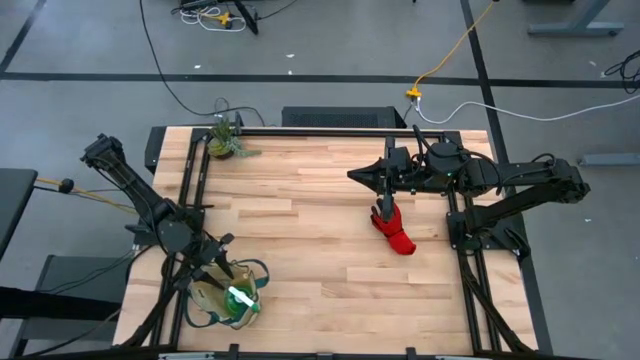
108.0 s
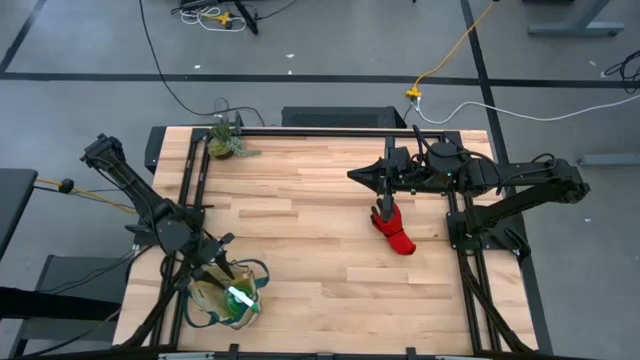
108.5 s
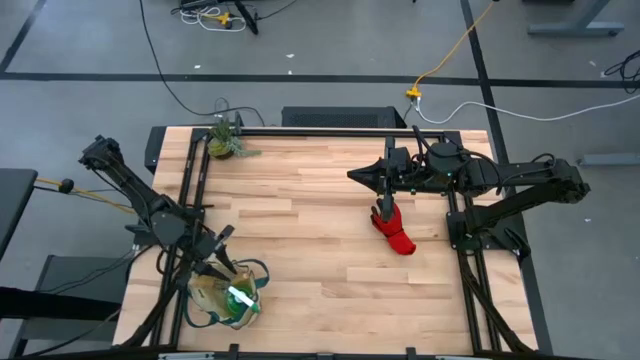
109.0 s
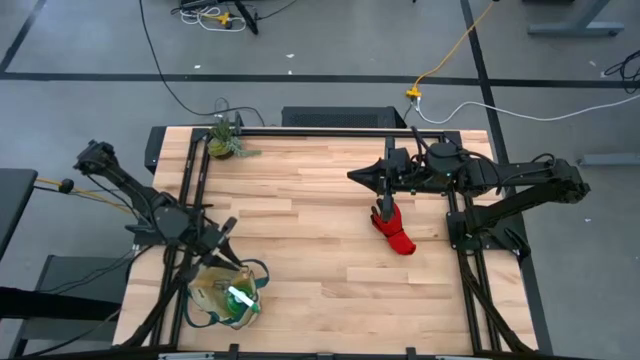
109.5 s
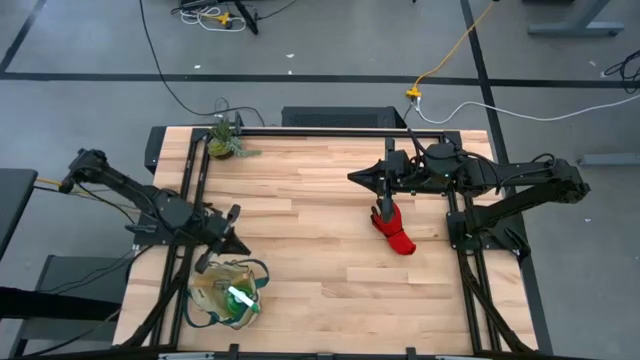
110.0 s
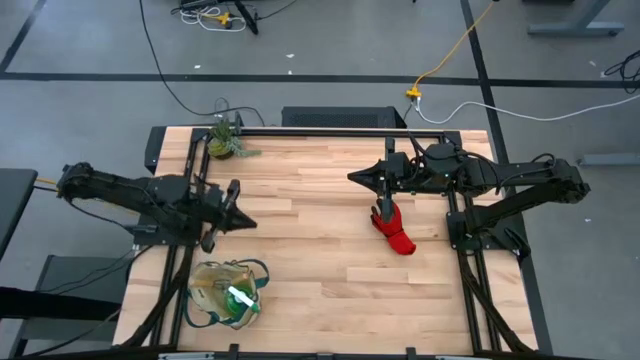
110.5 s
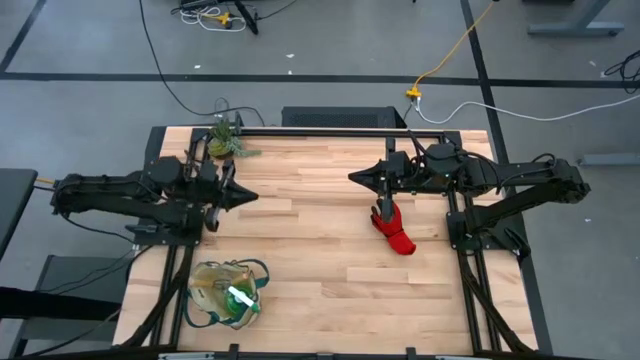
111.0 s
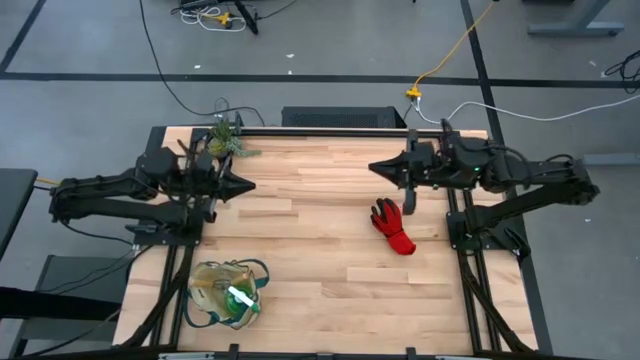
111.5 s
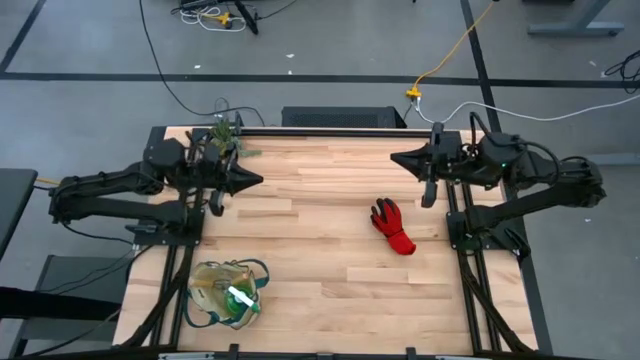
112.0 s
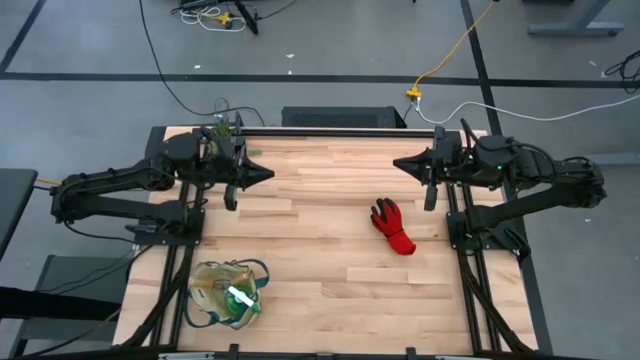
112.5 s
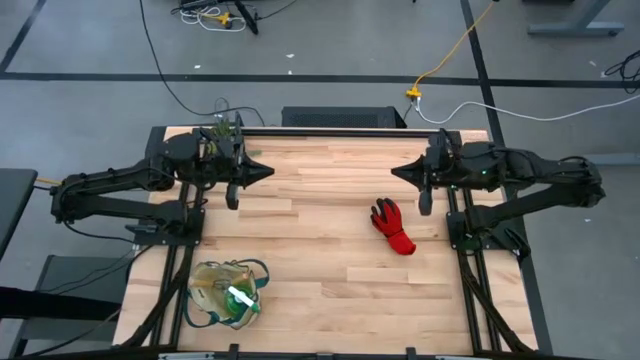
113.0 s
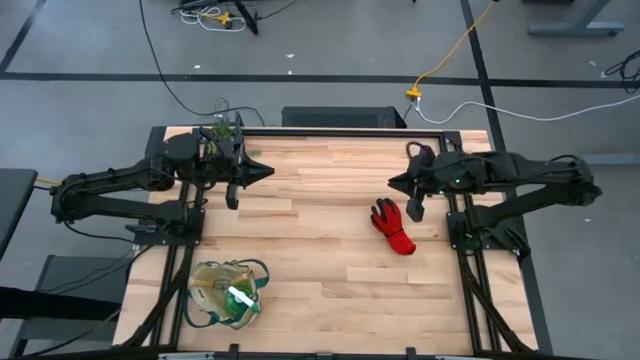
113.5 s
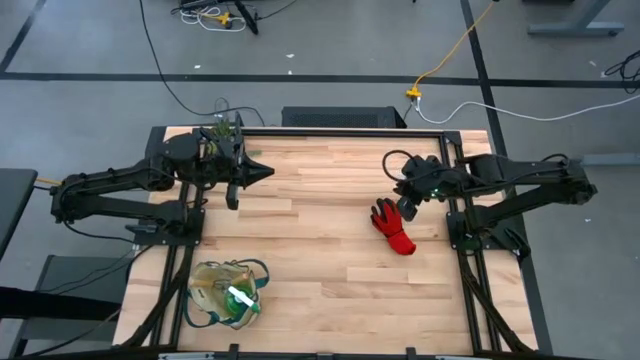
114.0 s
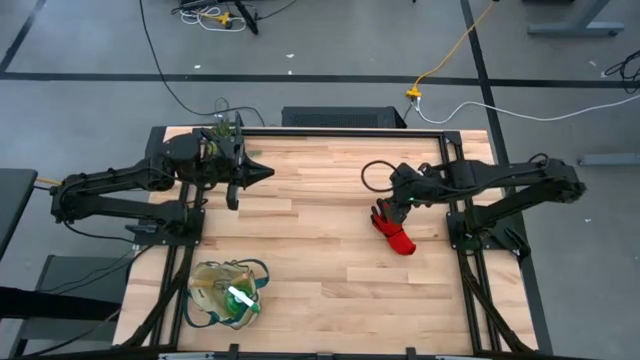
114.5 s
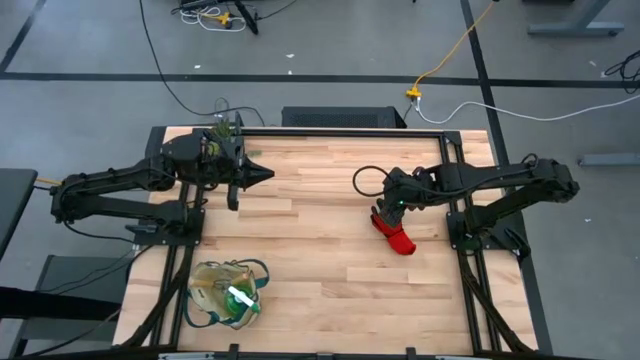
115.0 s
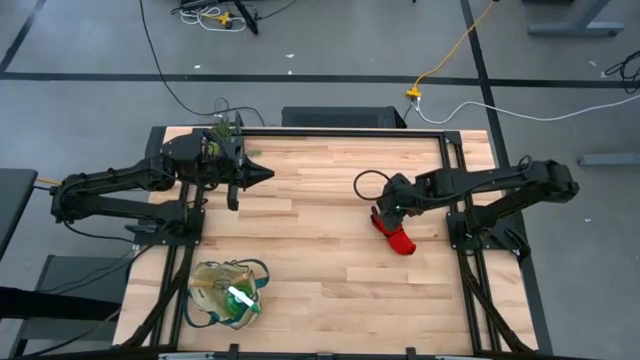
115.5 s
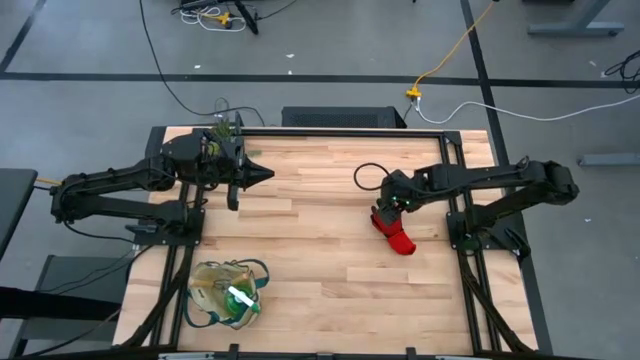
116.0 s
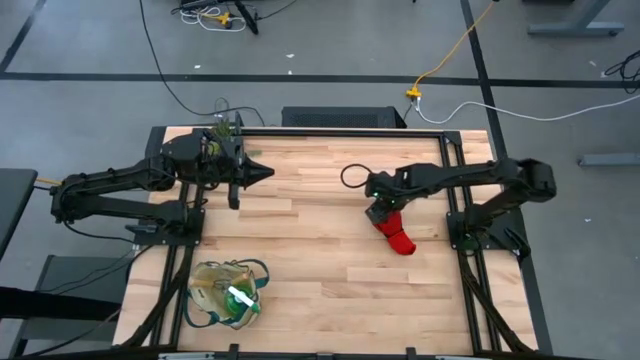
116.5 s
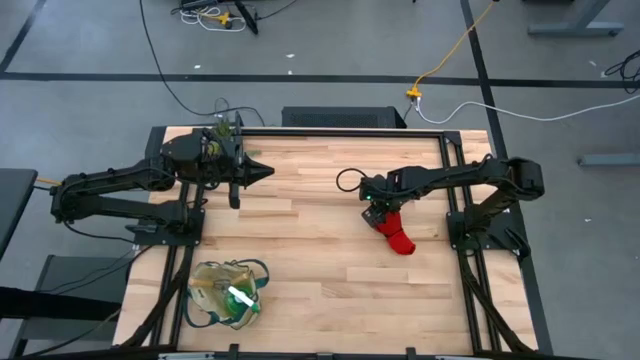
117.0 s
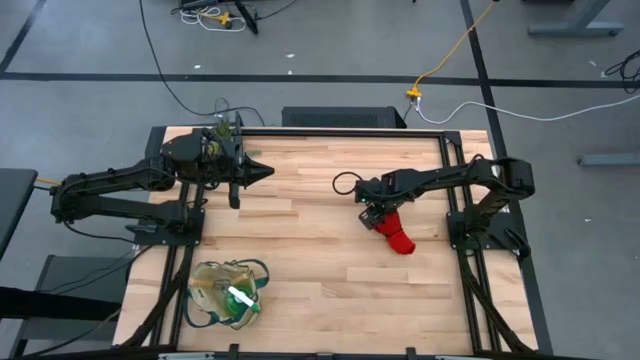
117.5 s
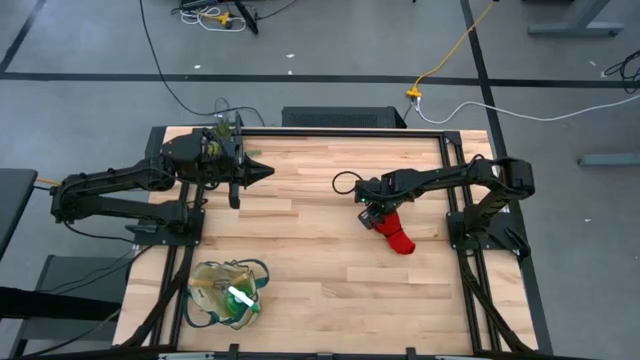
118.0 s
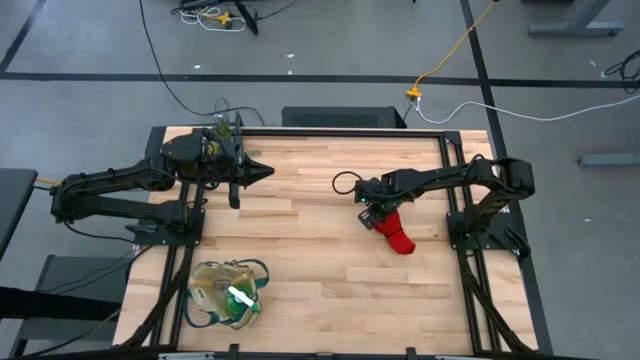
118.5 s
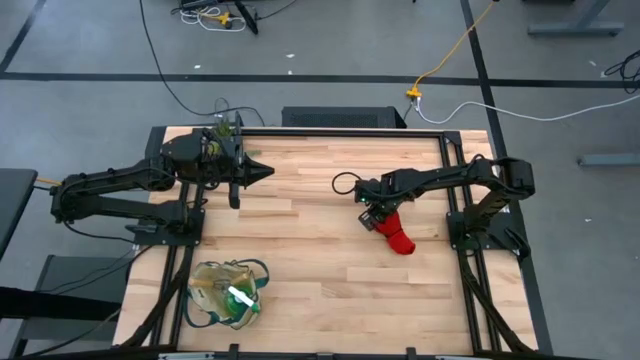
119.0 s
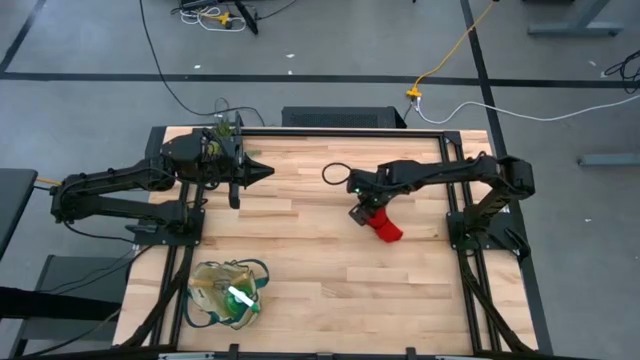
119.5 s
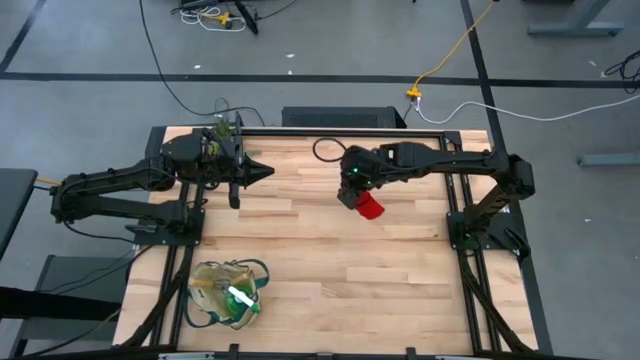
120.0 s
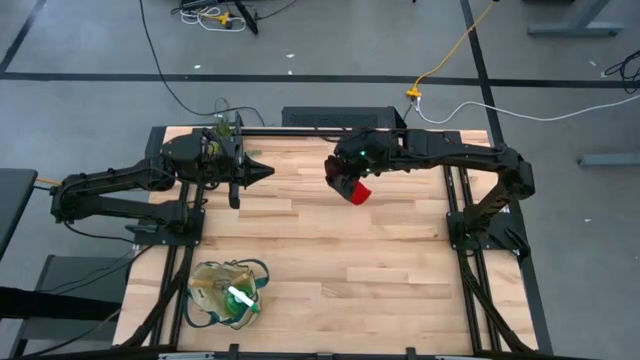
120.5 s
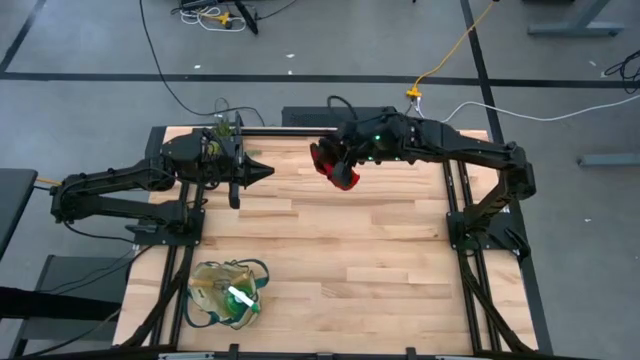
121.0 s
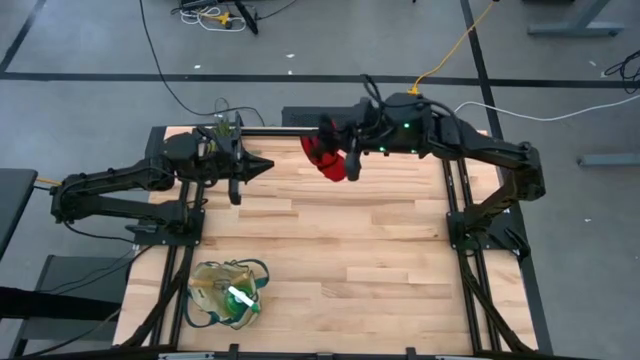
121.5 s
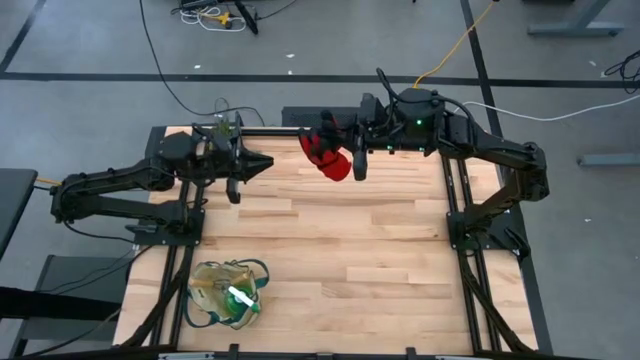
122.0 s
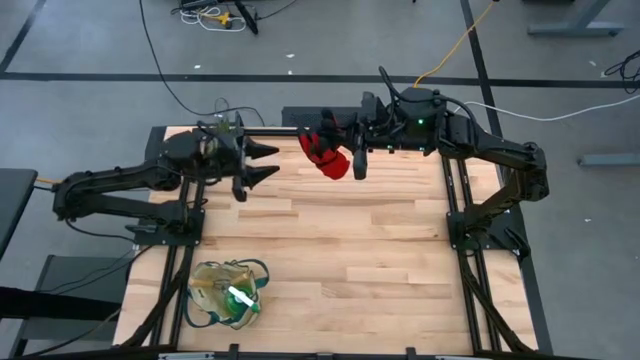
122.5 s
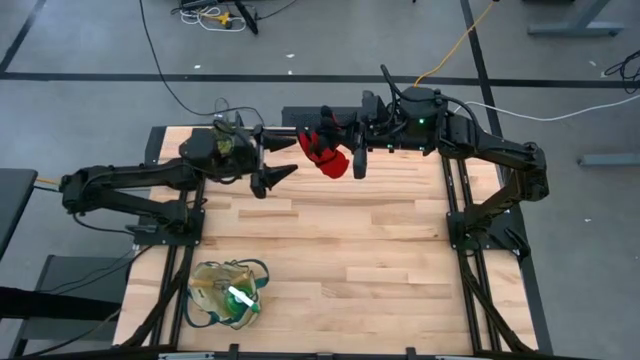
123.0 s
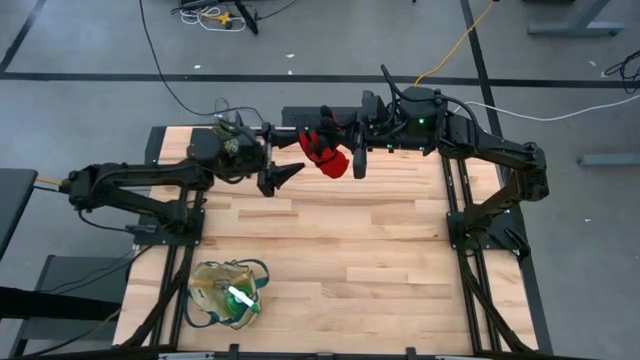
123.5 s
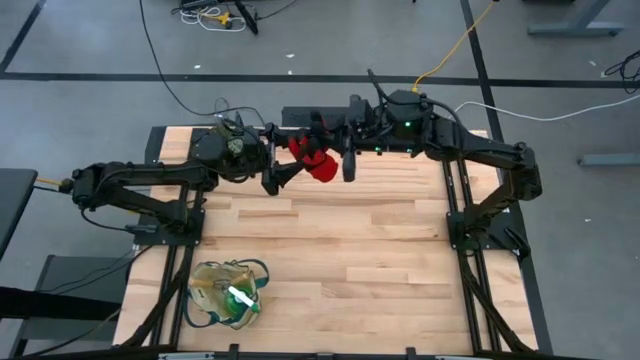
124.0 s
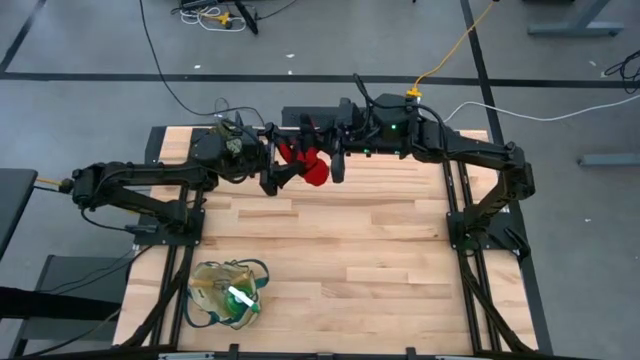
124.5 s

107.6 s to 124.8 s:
Task: Pick & Place Garden tools in Gardening bag
Put the red gloves into the white gardening bag

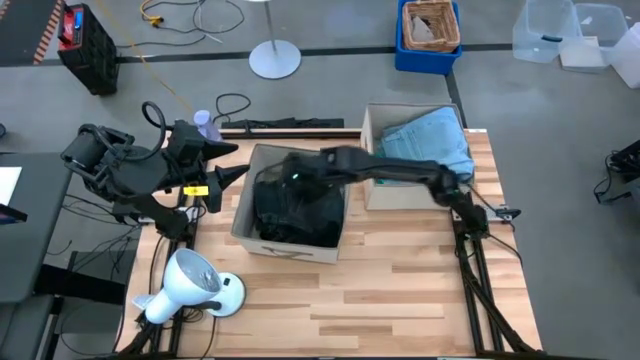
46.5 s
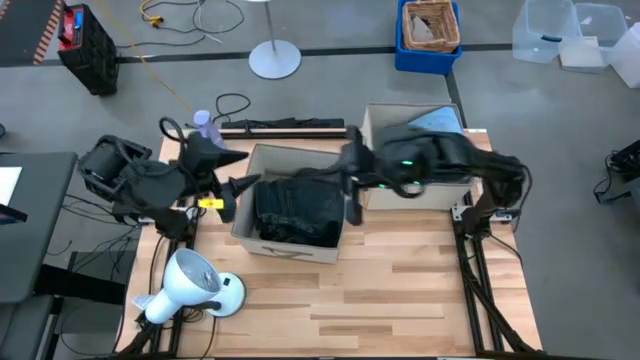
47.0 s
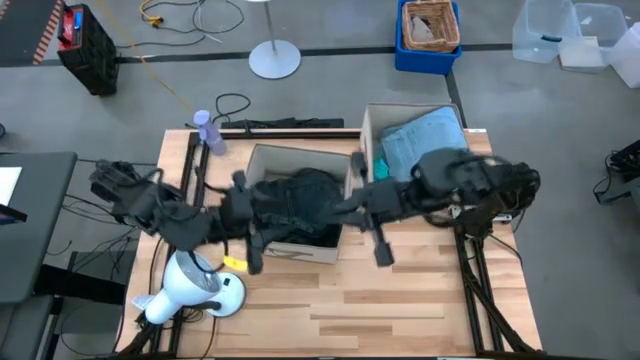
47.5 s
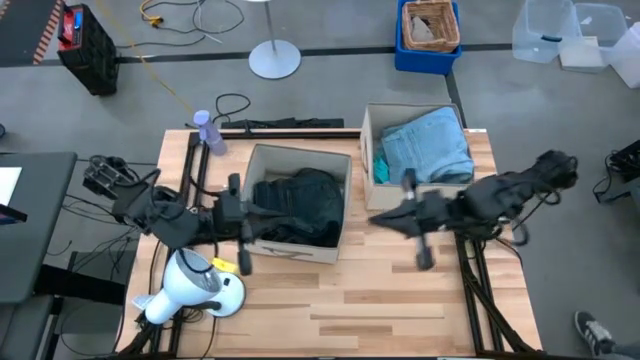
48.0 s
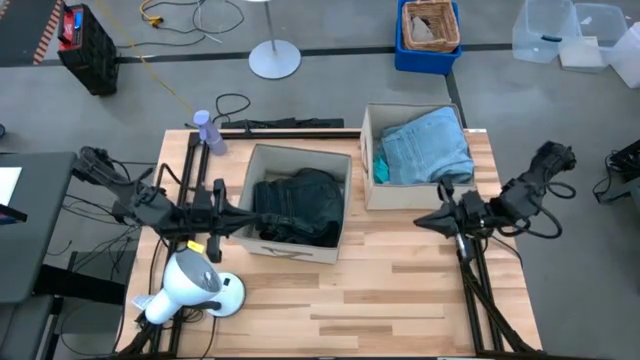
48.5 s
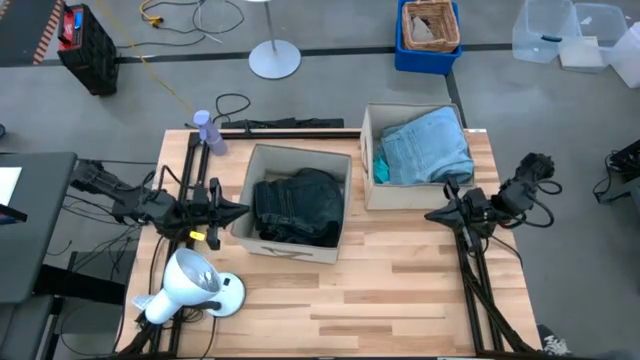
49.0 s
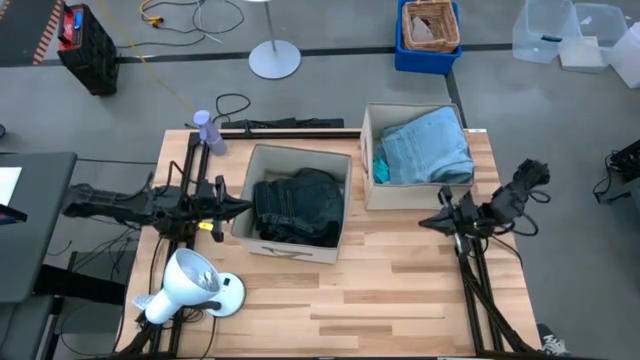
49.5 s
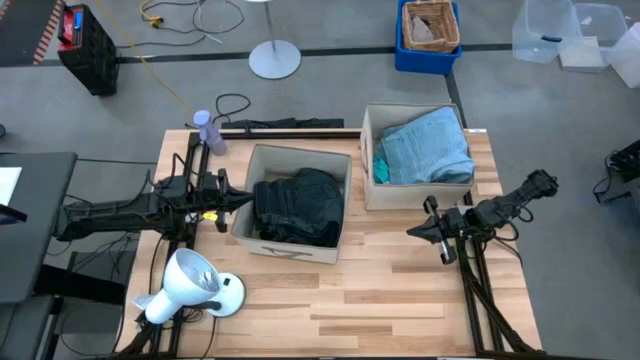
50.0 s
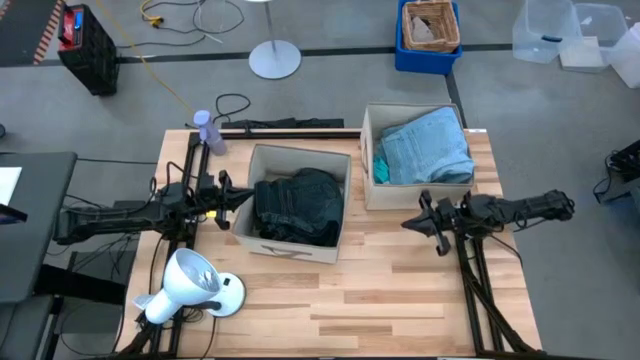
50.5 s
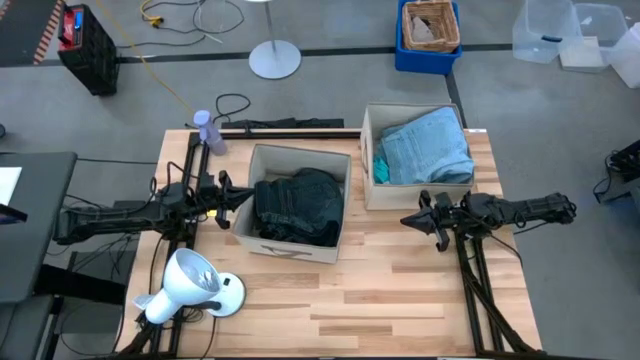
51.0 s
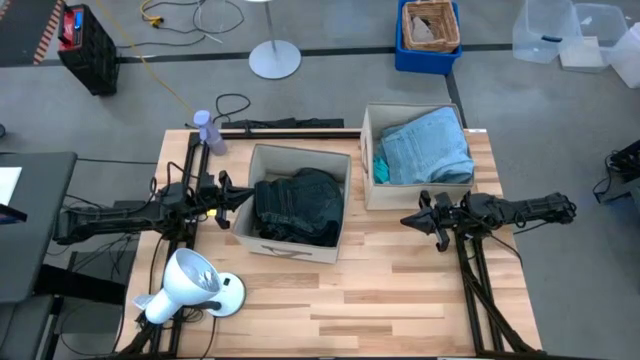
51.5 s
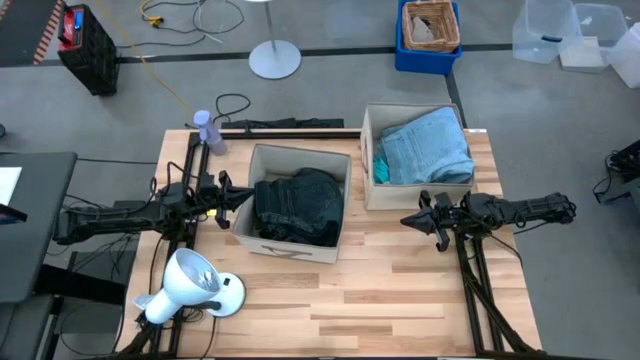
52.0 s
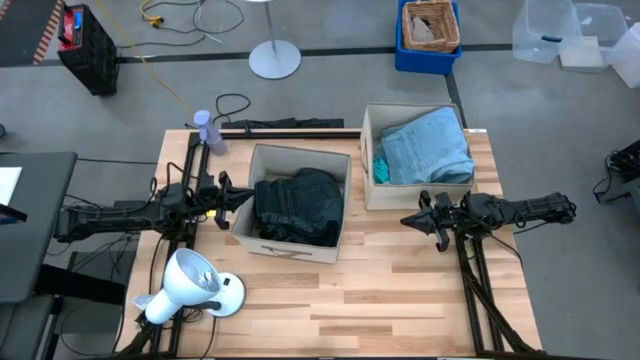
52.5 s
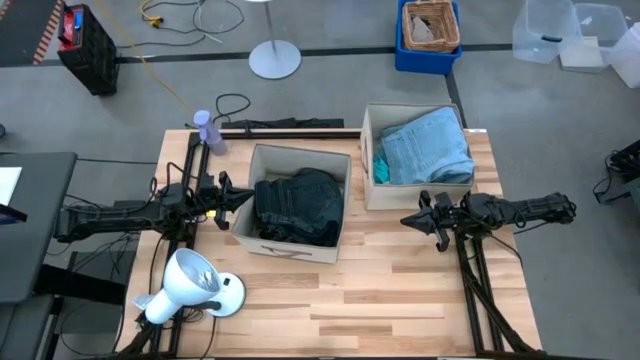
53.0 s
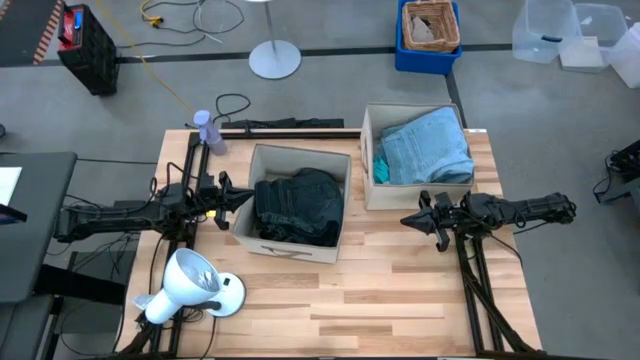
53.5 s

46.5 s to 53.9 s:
Task: Sort clothes
Return to Home Position
